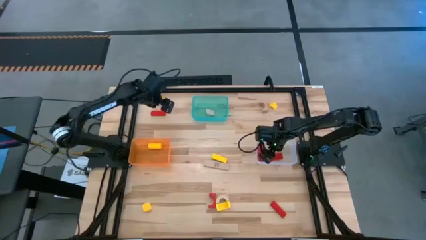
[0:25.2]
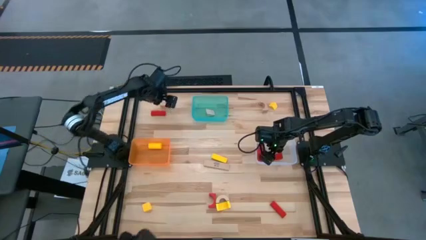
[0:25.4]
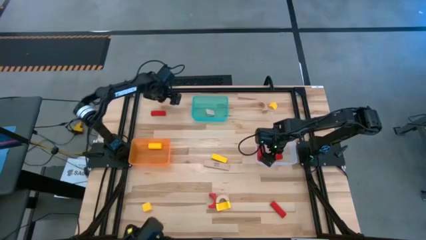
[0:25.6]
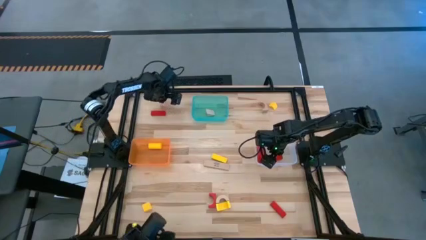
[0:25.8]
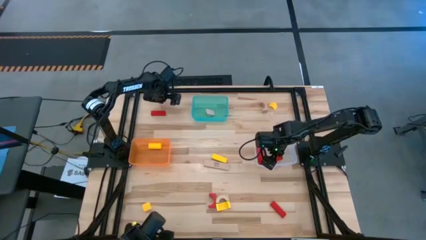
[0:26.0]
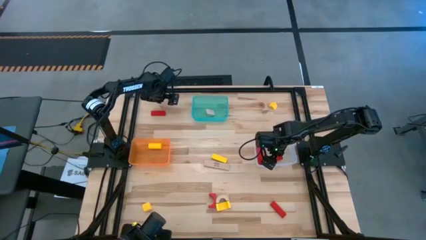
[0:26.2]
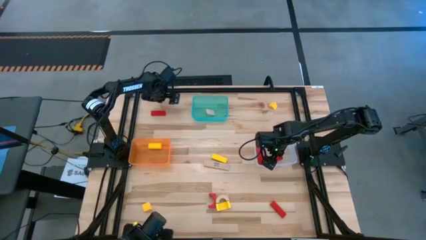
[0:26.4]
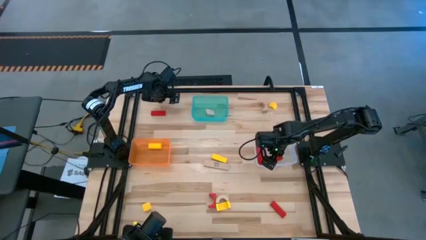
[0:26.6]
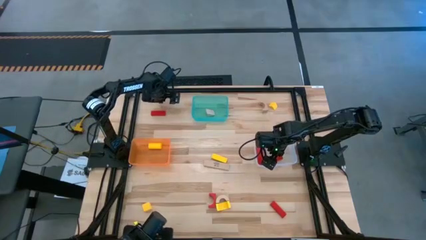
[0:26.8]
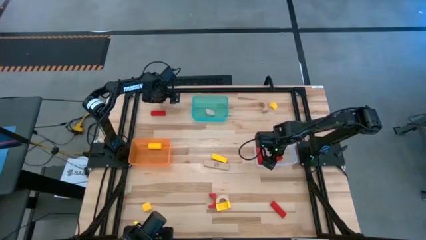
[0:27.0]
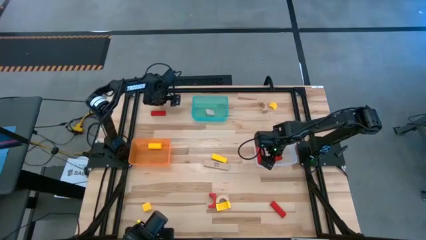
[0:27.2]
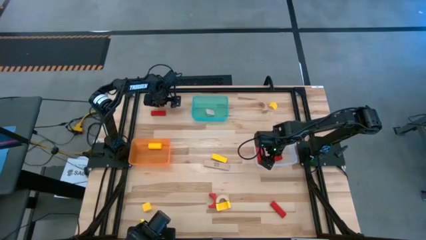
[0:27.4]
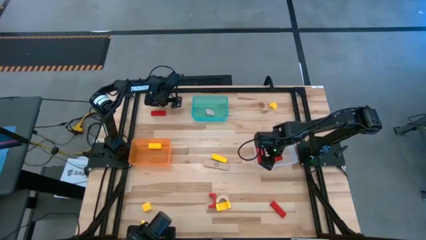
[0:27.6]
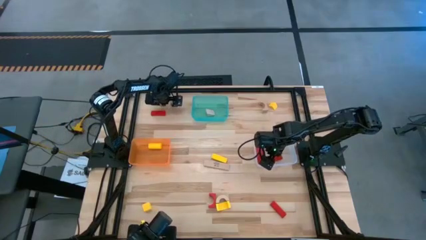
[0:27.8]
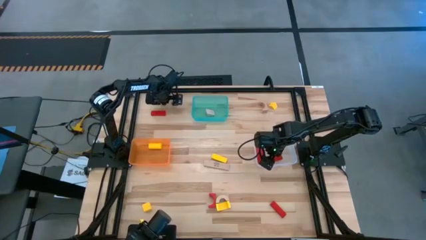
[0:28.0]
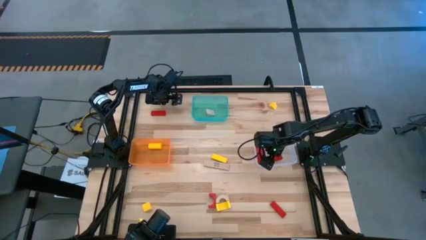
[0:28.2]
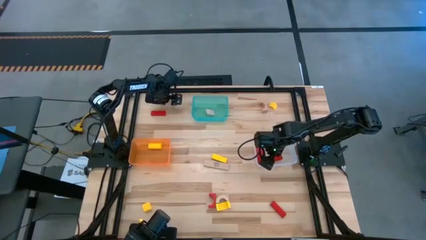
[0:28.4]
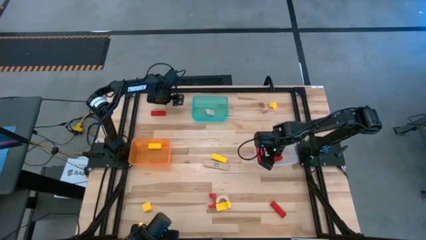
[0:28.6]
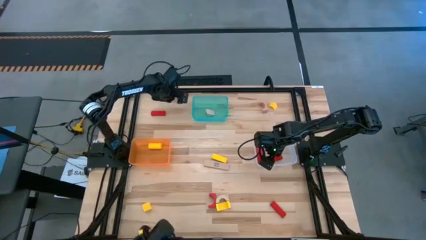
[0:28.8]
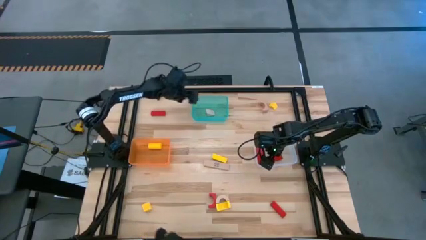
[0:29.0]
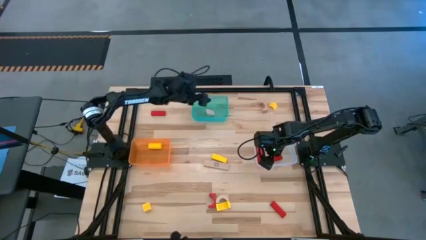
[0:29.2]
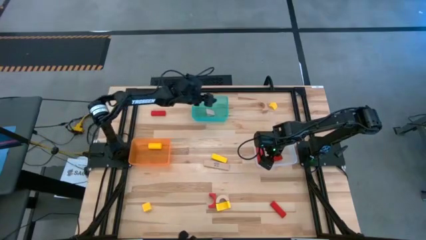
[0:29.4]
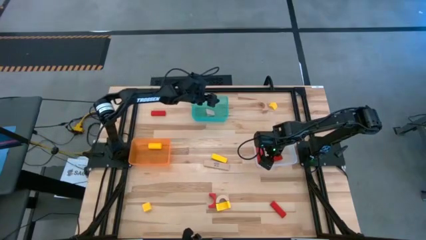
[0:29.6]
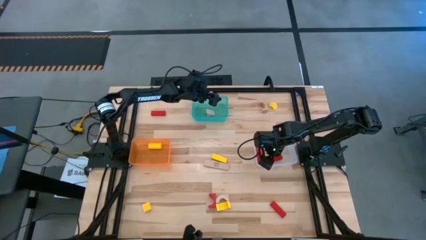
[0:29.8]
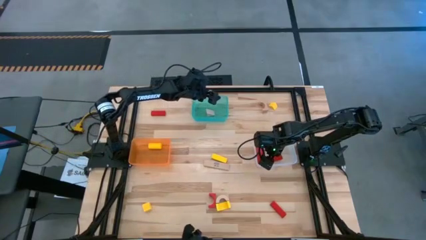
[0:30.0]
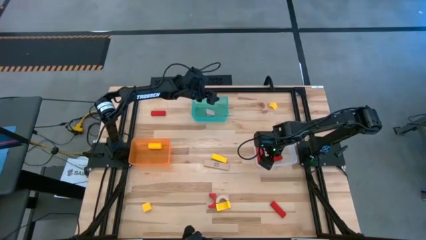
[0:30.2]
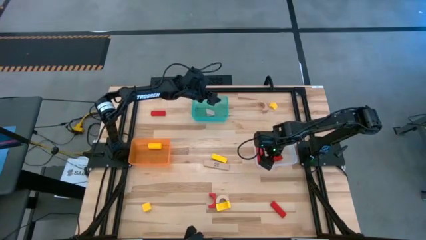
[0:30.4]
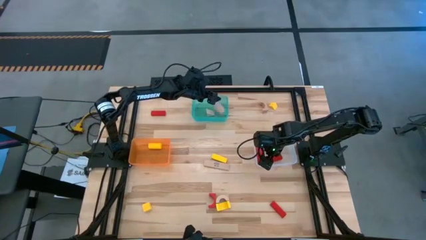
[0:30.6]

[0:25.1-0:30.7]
Task: Sort & place blocks by color
Put the brown block into the green bin

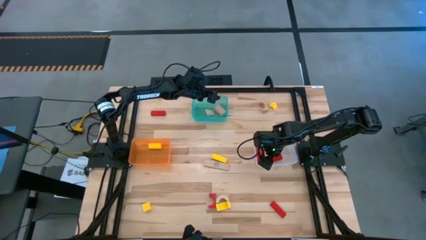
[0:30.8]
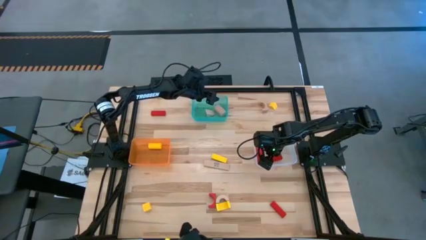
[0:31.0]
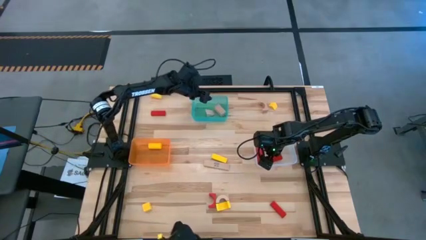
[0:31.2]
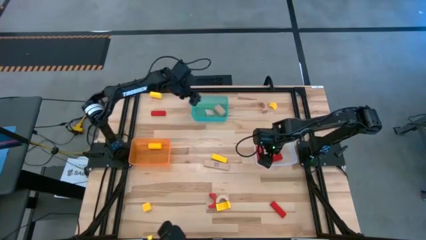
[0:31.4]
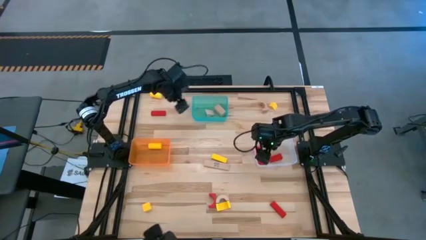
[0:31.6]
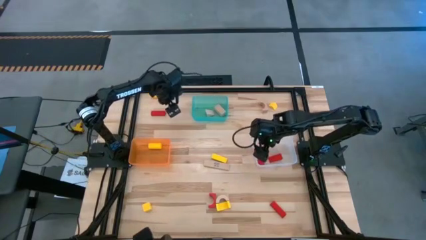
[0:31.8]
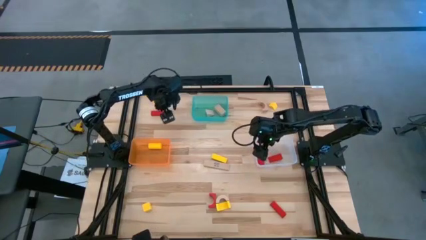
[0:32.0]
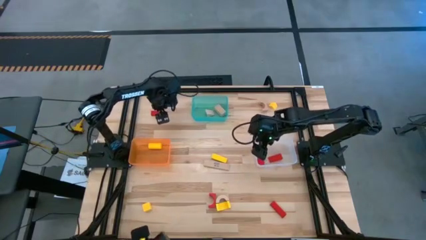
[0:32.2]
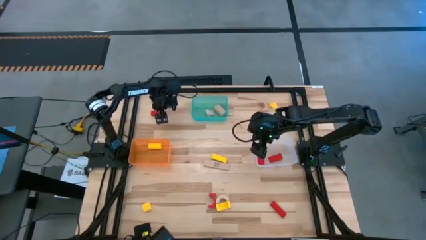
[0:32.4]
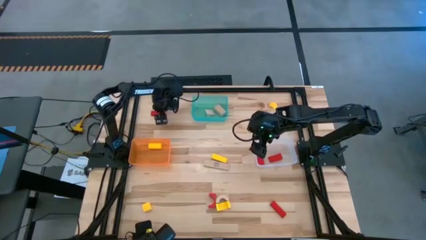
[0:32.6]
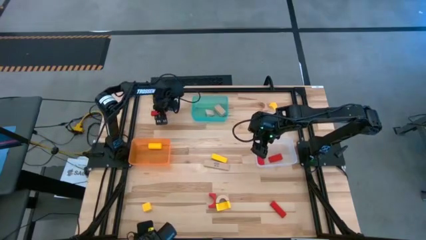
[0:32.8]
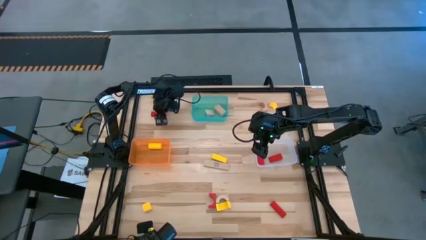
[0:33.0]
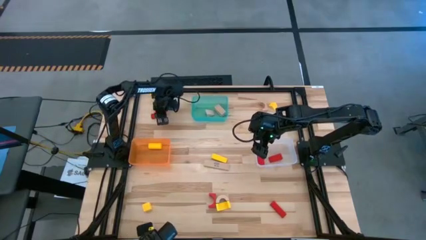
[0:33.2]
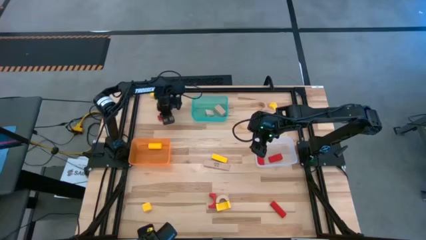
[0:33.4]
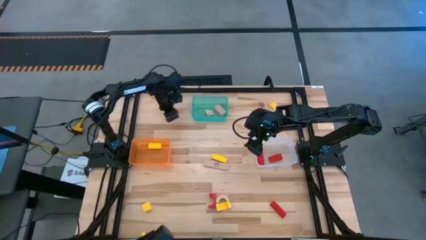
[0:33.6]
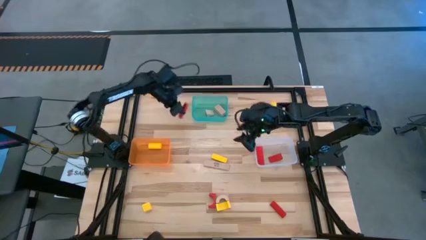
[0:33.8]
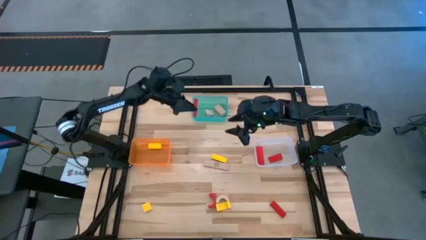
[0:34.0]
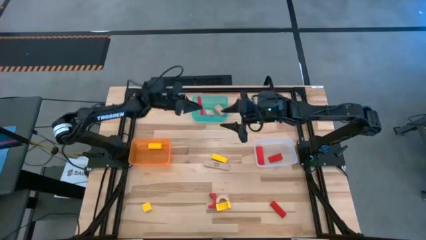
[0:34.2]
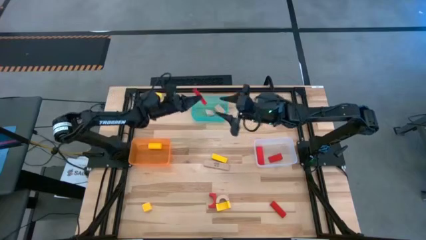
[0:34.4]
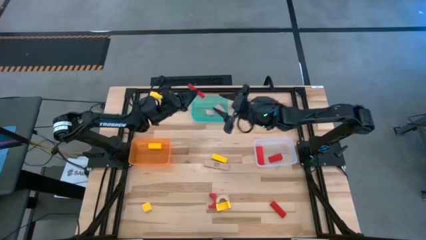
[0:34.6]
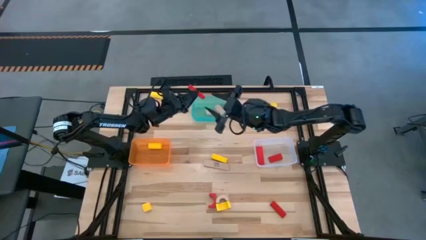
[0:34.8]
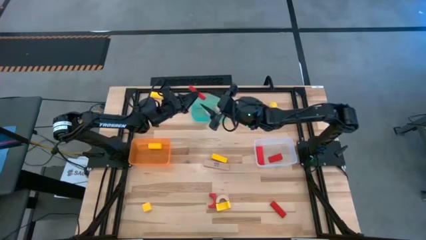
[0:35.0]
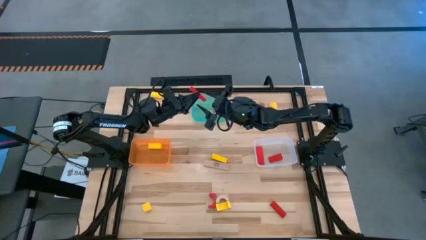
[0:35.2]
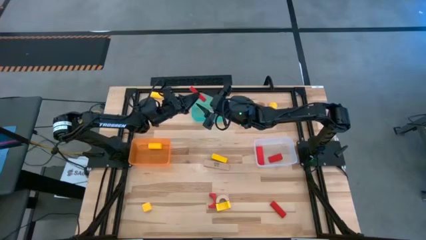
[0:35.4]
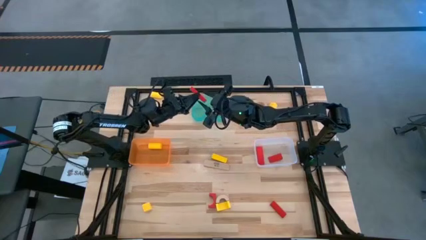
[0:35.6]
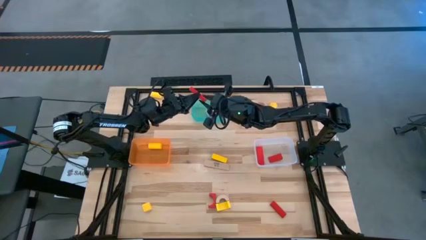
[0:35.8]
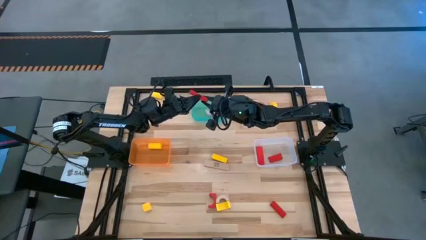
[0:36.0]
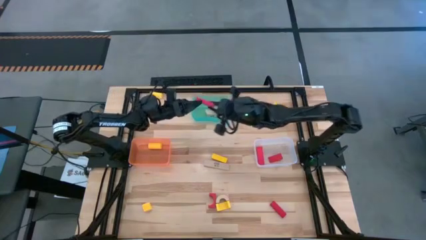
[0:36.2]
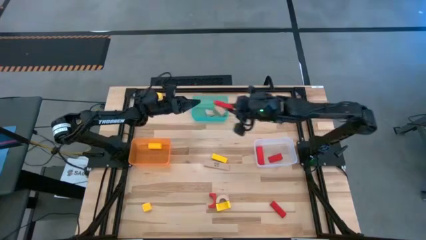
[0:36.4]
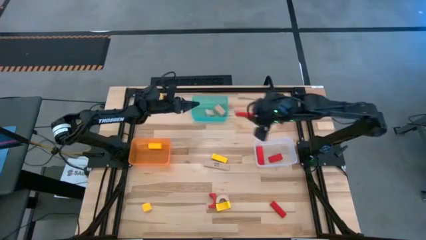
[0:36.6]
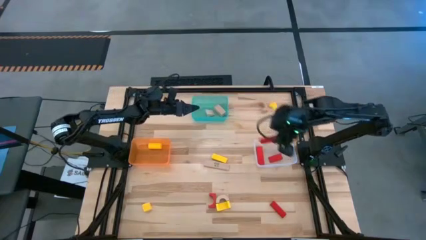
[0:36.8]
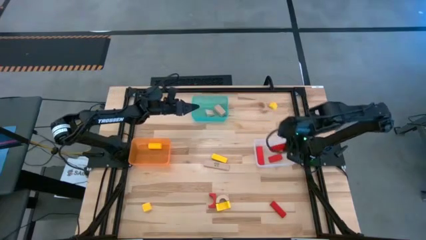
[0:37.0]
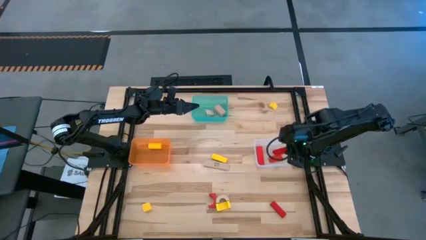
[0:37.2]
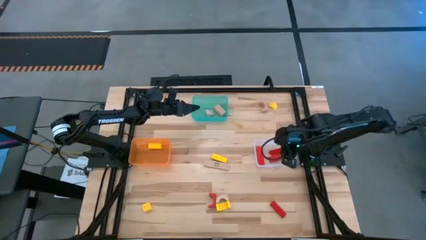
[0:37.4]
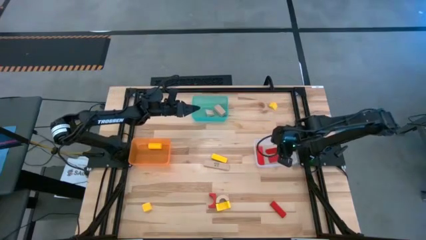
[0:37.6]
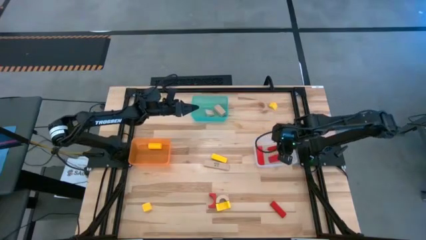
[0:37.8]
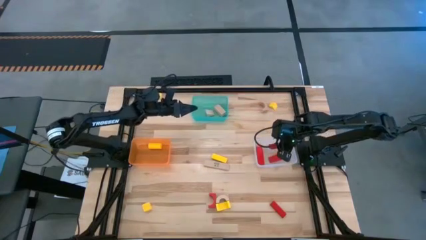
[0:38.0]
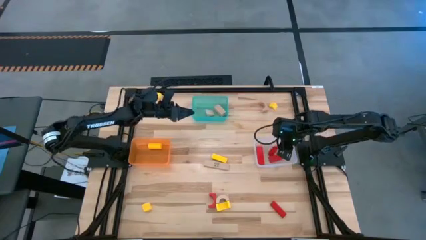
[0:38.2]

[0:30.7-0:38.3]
Put the red block into the white bin

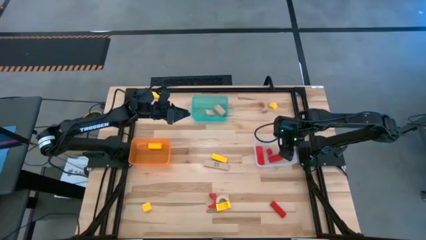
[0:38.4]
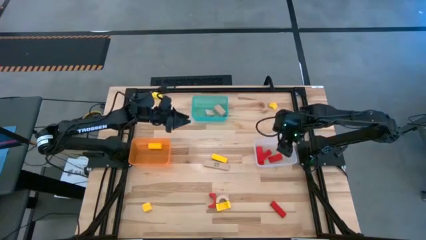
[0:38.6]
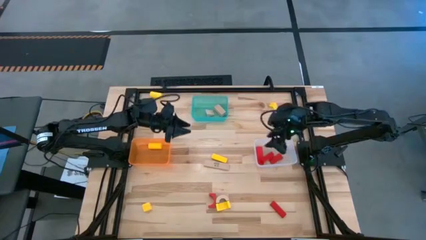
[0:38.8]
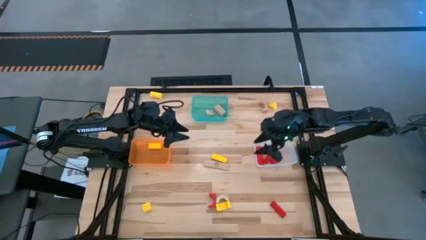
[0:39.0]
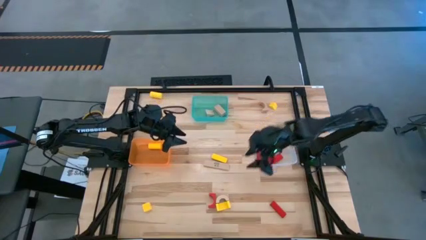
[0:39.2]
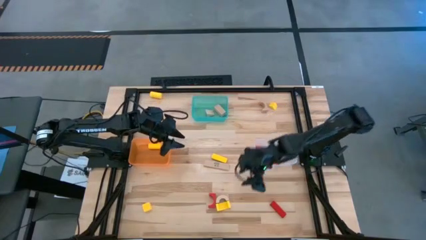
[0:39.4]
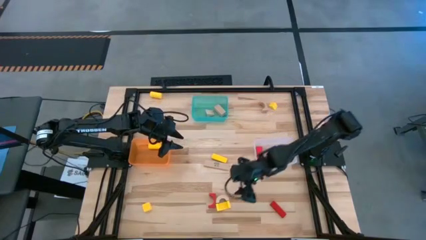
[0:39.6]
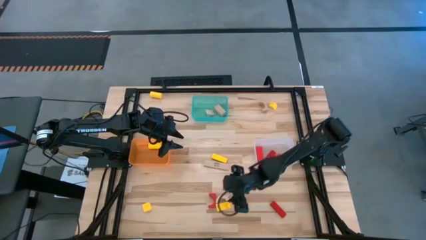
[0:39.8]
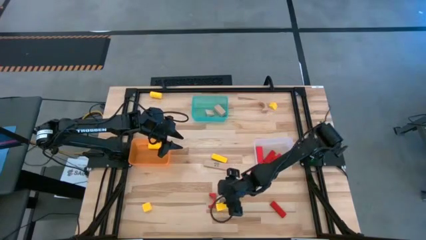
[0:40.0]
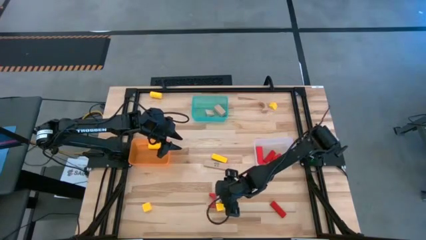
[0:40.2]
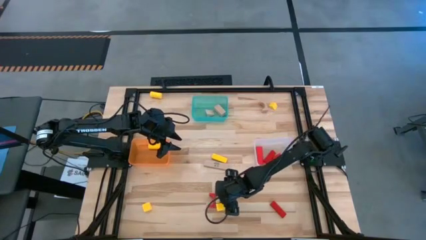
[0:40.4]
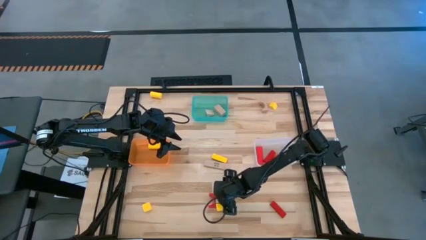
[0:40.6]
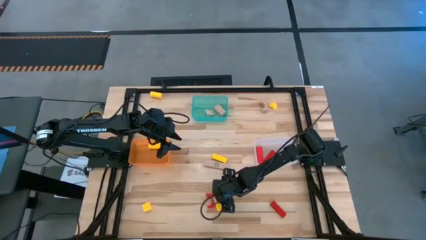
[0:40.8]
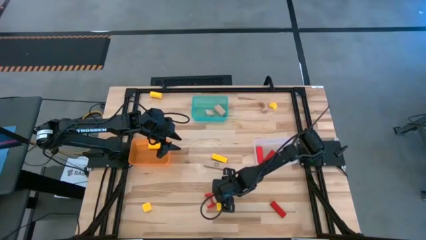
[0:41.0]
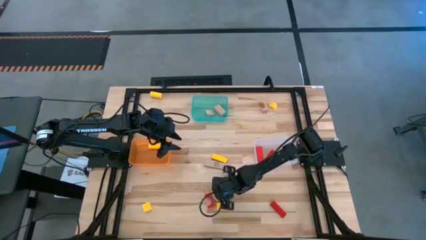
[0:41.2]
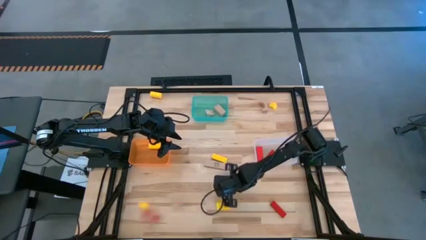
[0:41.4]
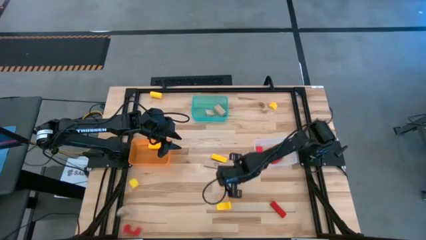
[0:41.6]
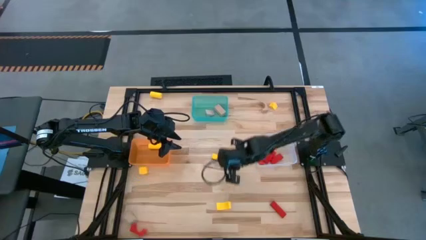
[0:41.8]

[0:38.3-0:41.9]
Put the brown block into the green bin

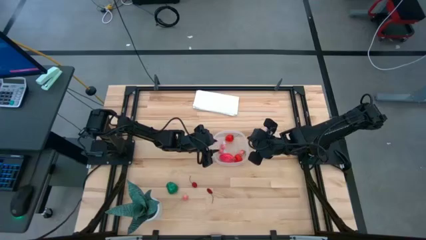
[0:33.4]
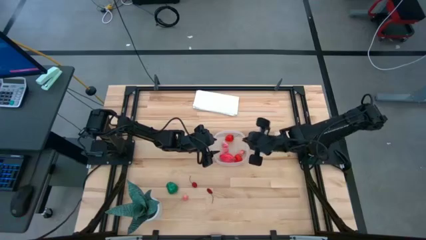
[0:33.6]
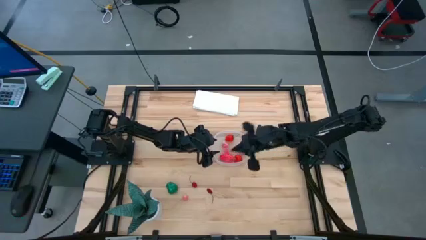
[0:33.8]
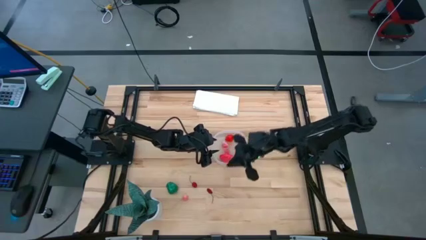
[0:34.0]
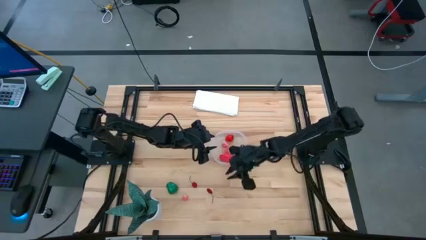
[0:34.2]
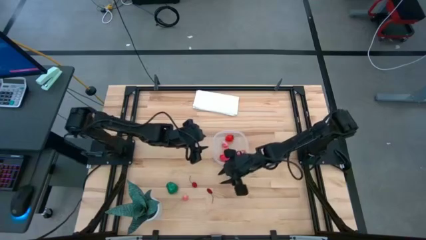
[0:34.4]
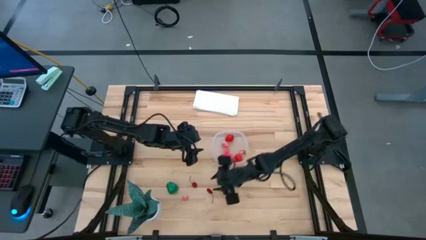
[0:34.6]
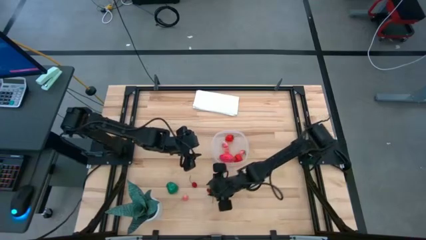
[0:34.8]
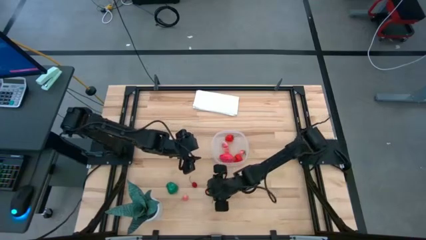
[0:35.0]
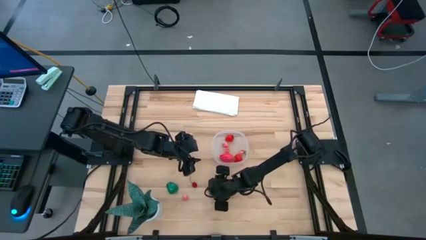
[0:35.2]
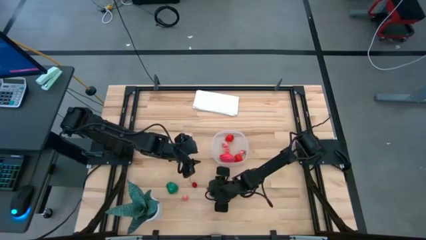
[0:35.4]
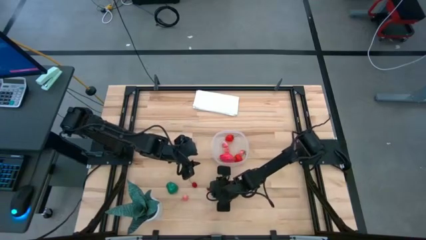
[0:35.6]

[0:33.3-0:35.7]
Task: Pick and placing Produce into tupperware
Put the red cherry into the transparent bin
